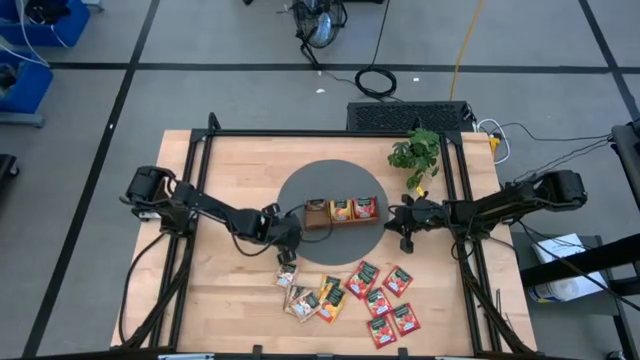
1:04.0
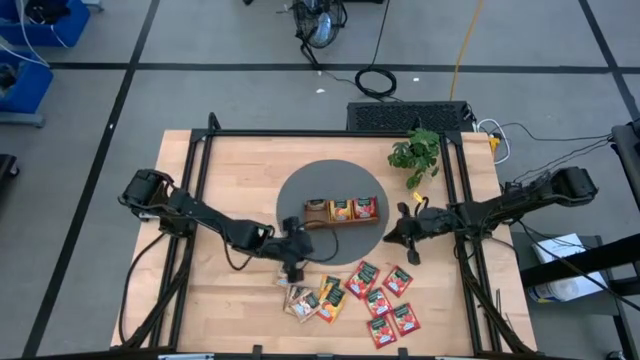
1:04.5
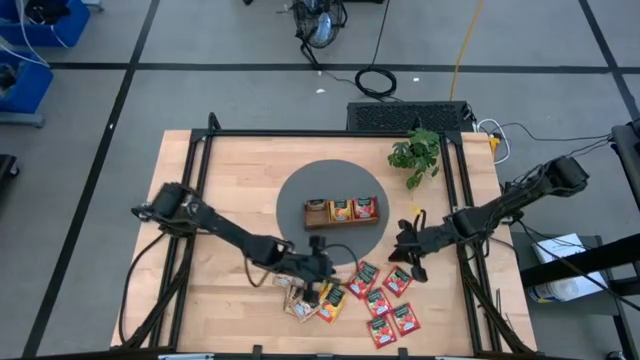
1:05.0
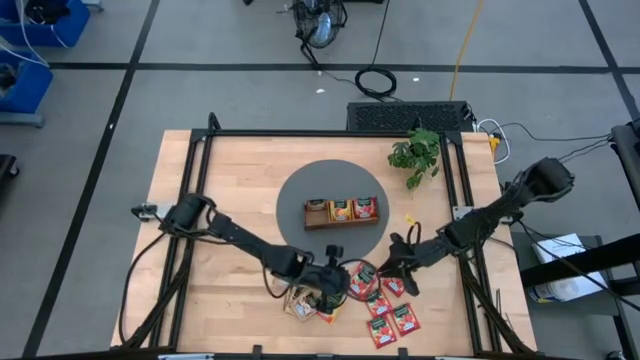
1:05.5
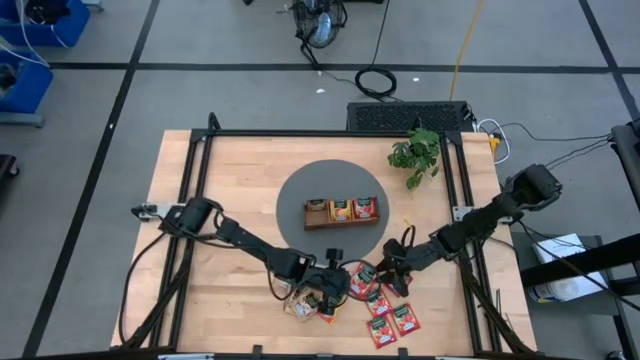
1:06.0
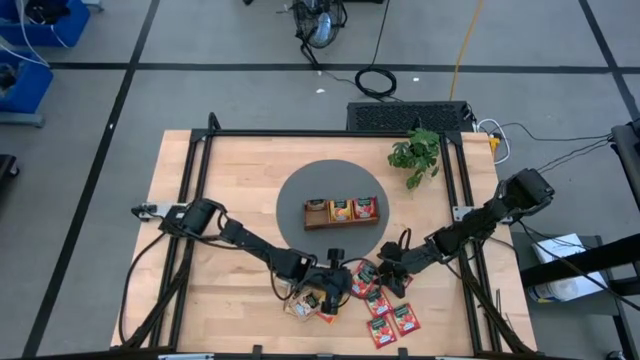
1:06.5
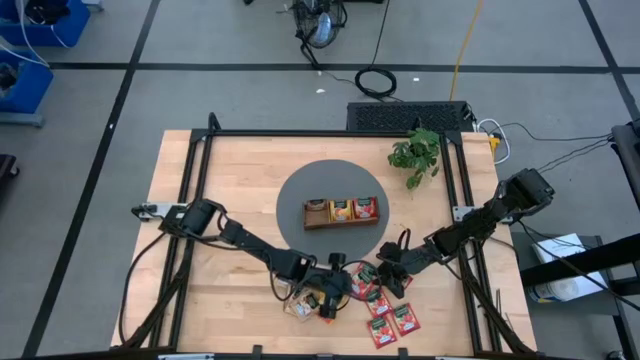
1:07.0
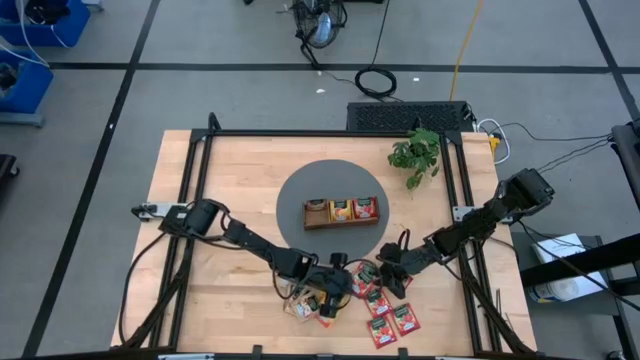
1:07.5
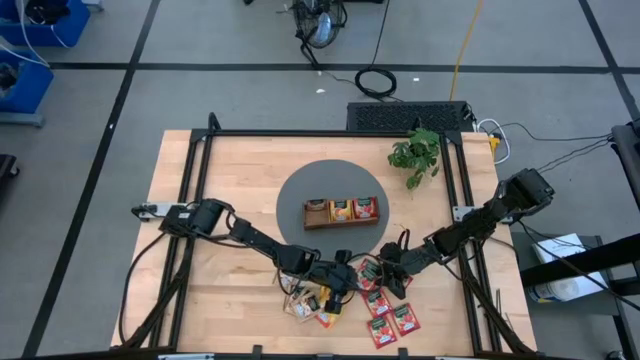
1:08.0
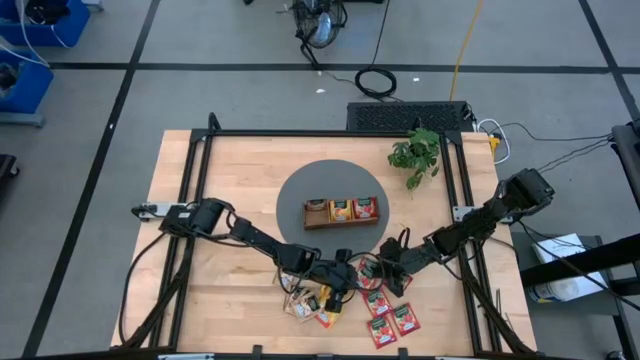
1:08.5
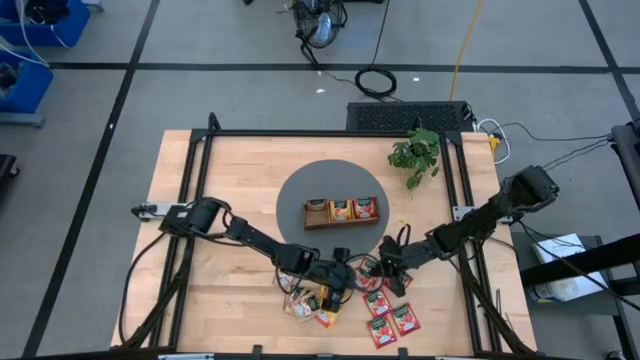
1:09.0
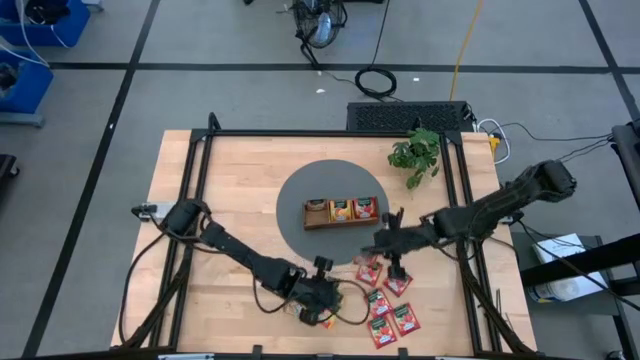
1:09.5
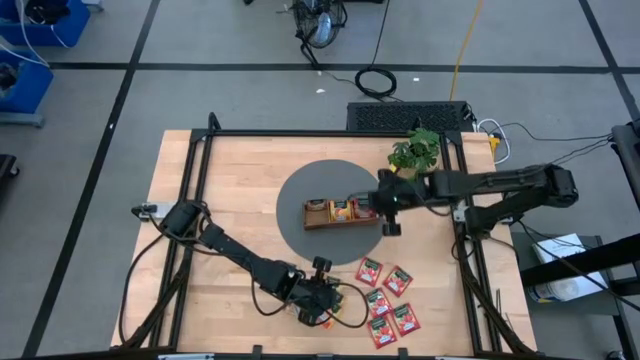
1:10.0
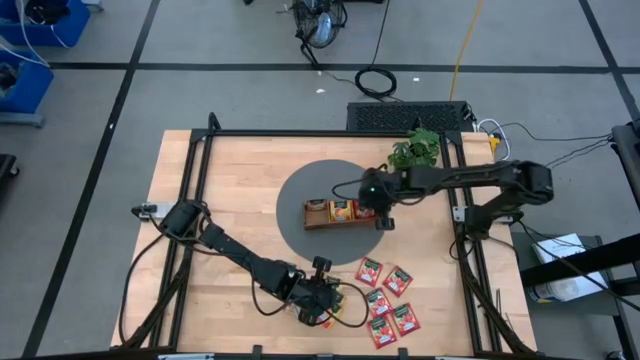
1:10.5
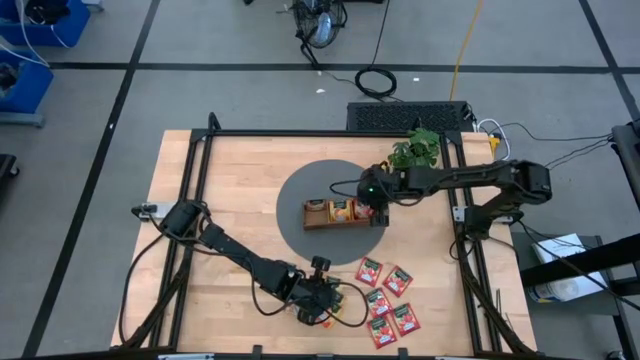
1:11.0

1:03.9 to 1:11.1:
Task: Pick & Place Tea
Put the red tea bag into the right compartment of the wooden organizer

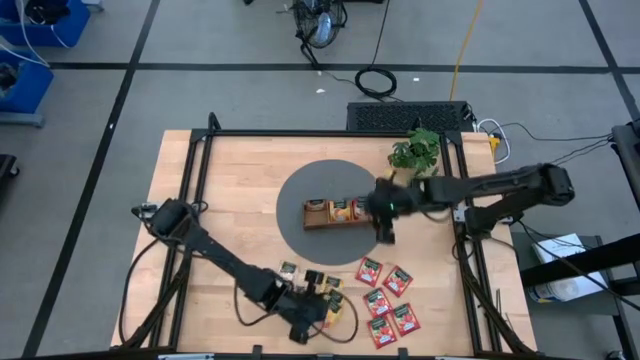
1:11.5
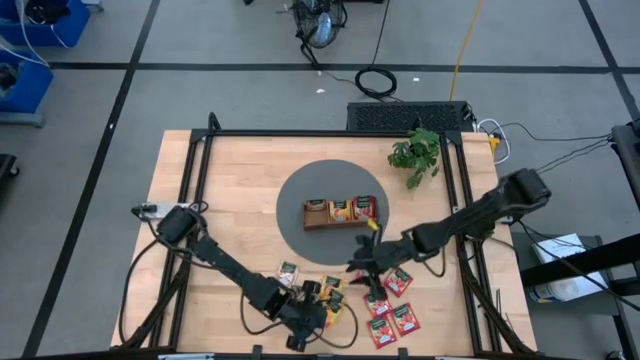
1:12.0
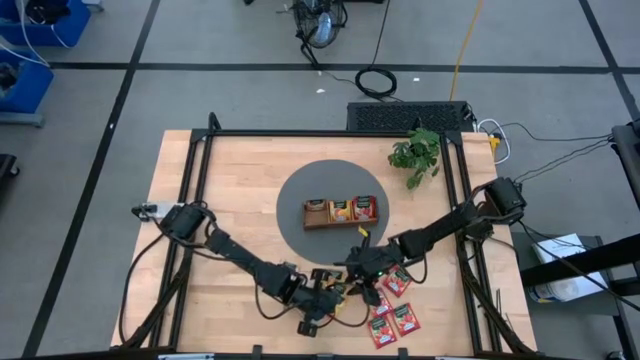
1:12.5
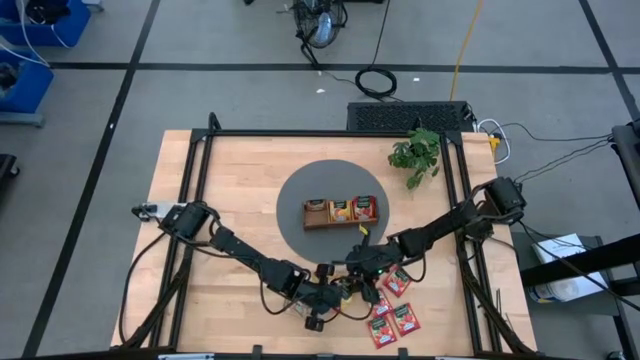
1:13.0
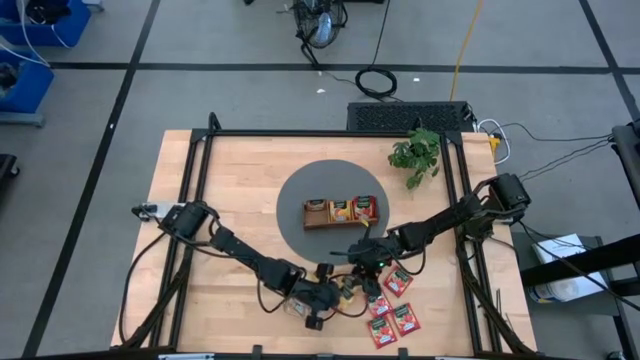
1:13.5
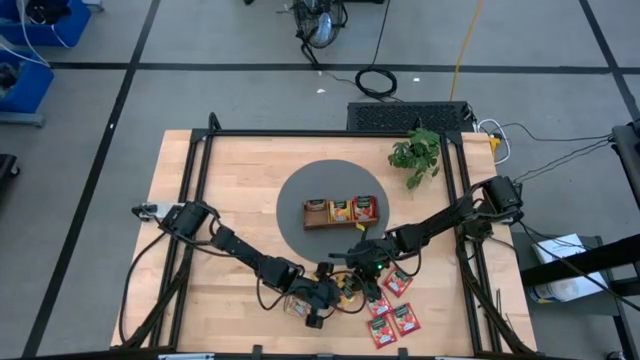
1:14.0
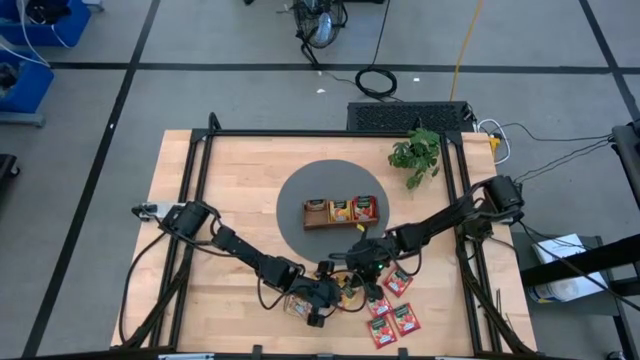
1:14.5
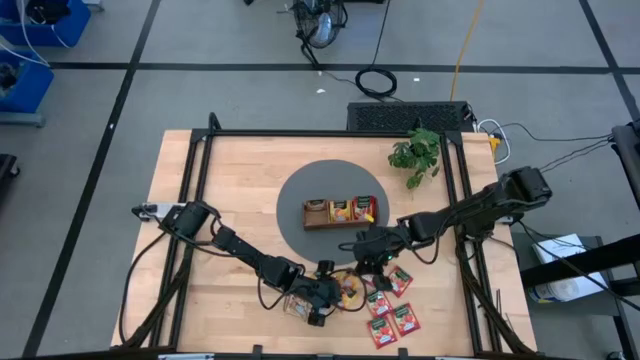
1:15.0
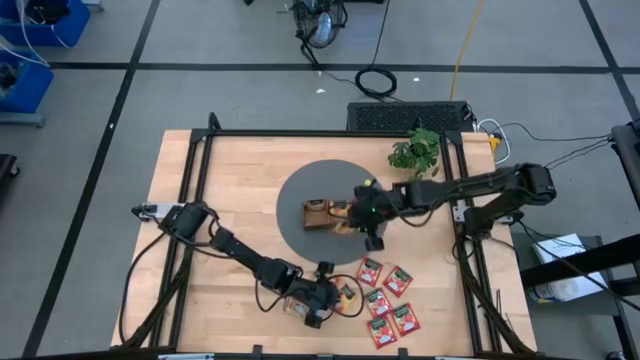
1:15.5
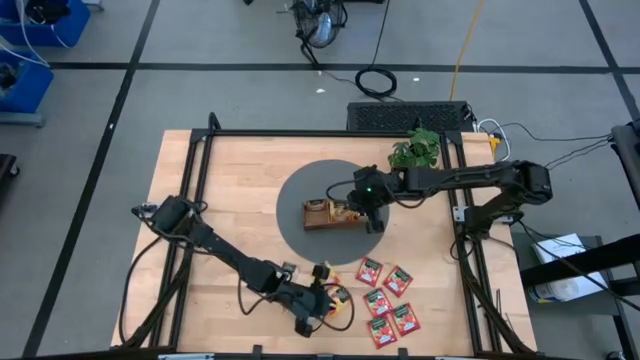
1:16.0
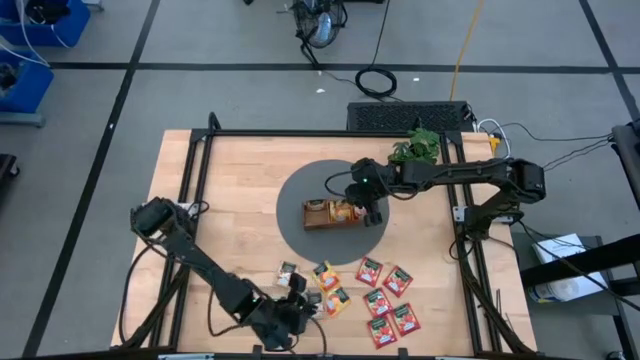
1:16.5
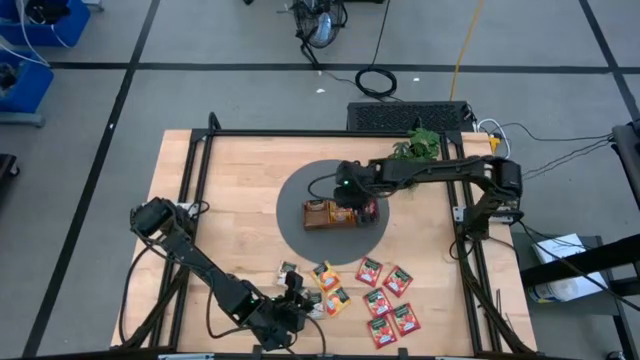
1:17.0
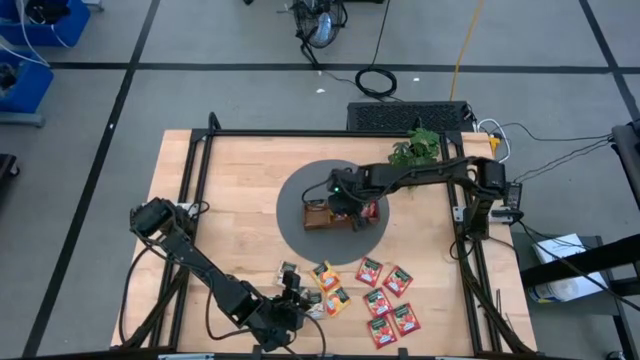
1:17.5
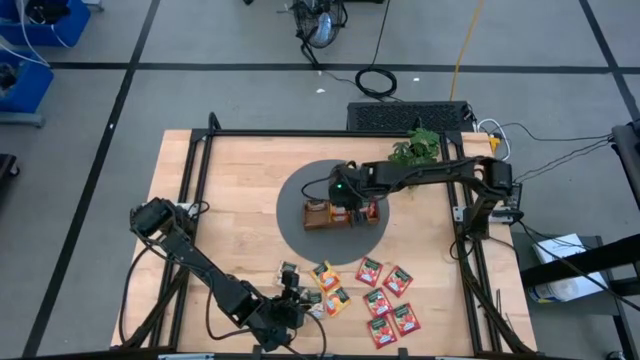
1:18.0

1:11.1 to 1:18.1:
Put the yellow tea bag into the middle compartment of the wooden organizer

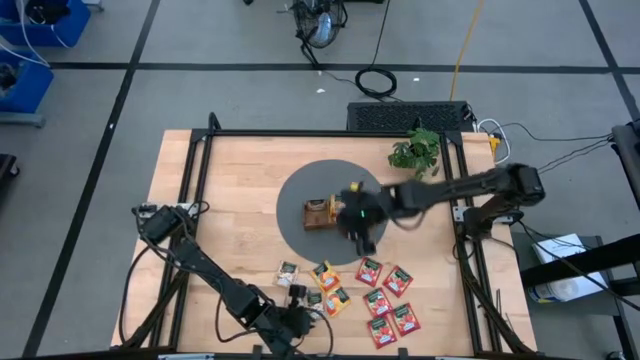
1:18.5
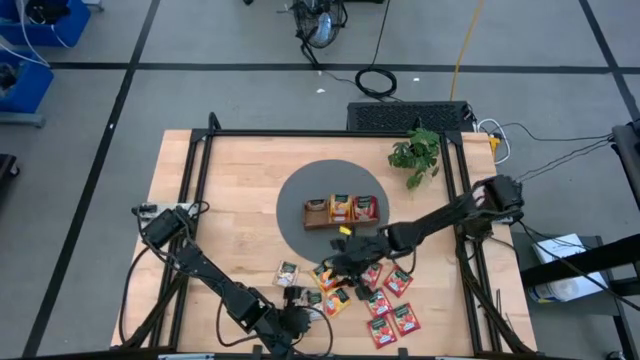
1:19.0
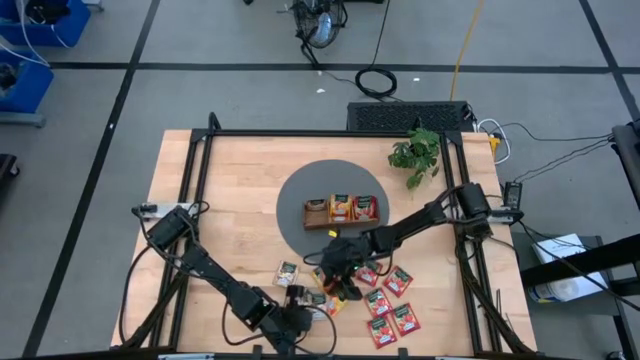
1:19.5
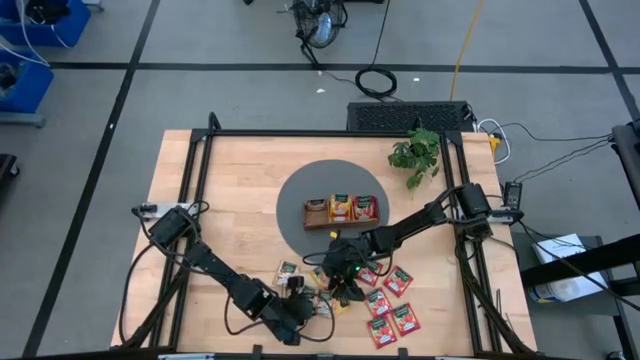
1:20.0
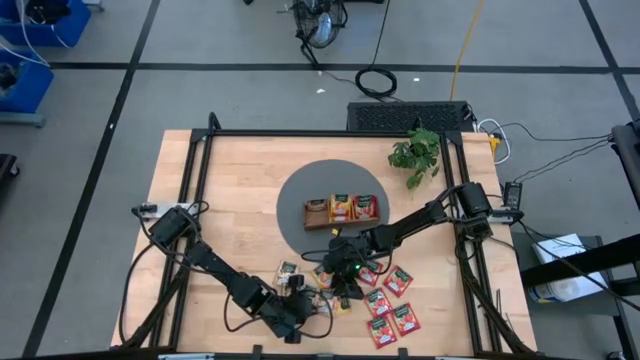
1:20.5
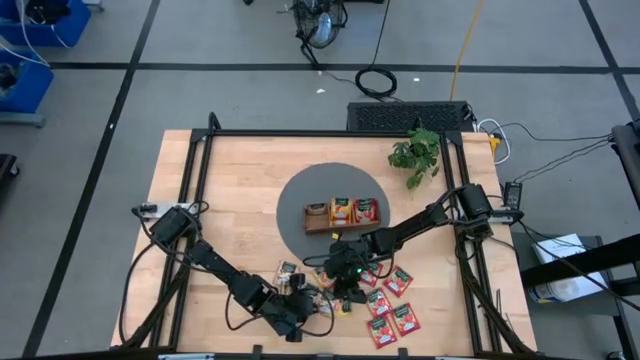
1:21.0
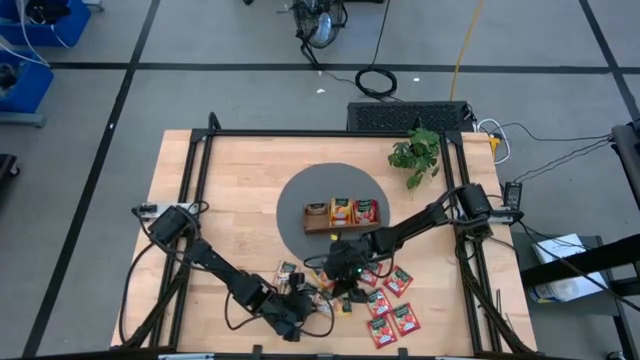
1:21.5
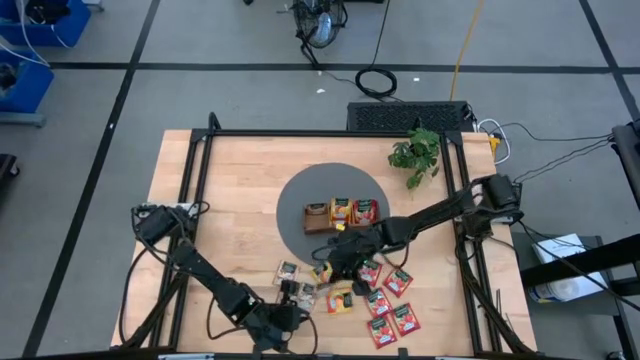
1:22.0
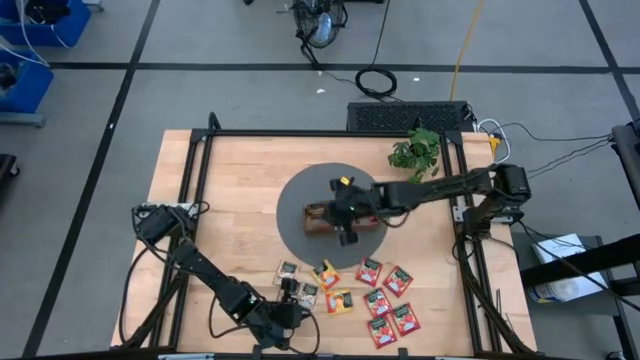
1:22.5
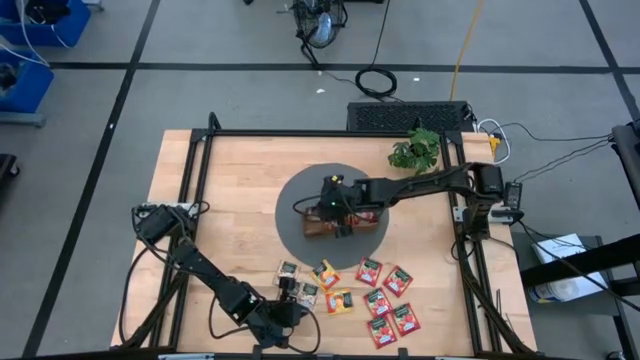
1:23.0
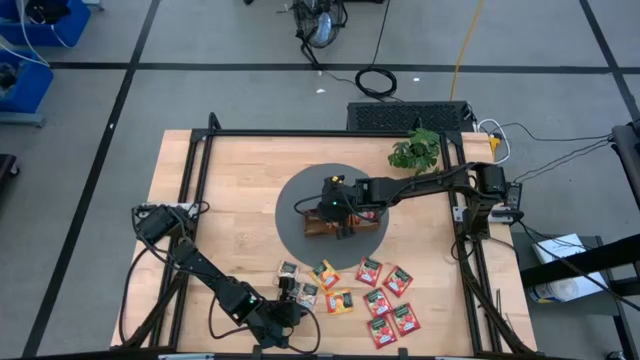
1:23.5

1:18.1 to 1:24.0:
Put the gold tea bag into the left compartment of the wooden organizer

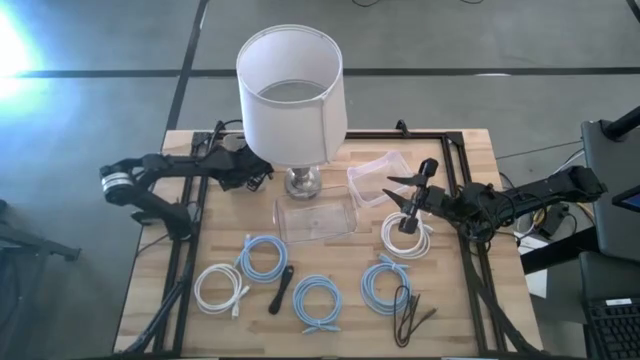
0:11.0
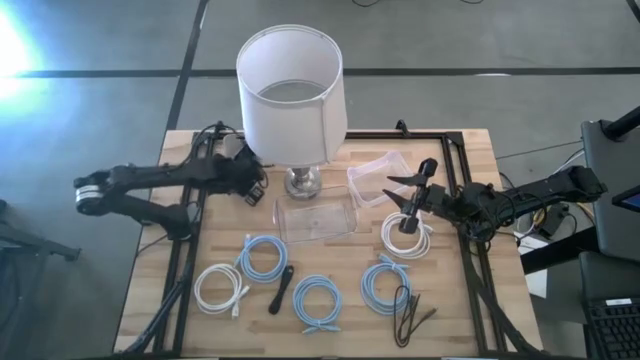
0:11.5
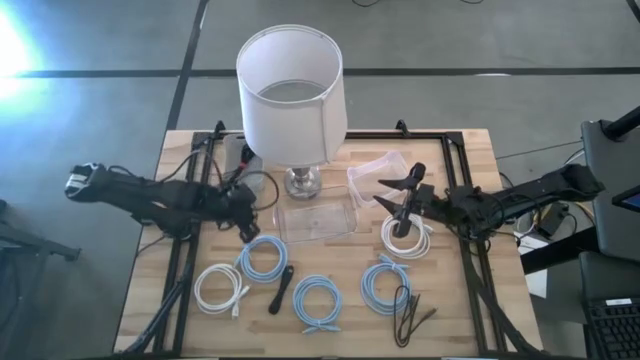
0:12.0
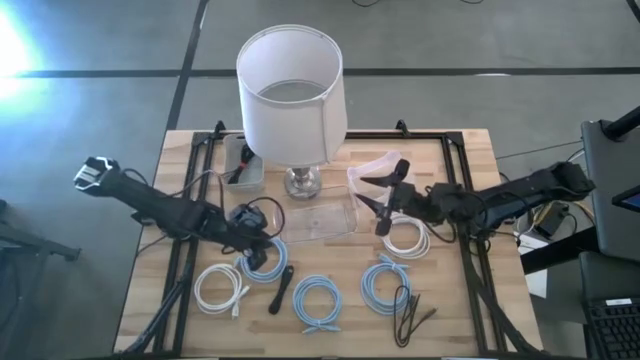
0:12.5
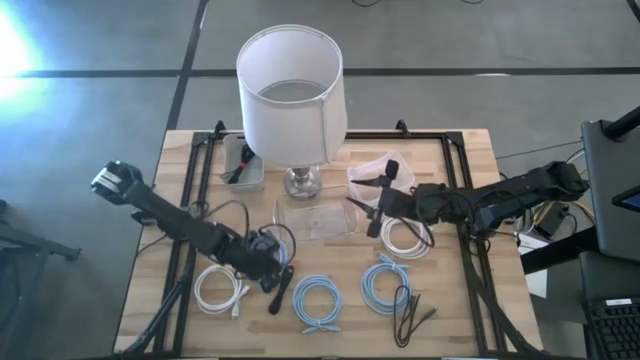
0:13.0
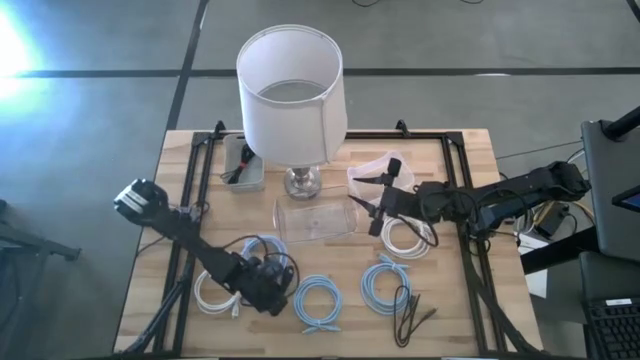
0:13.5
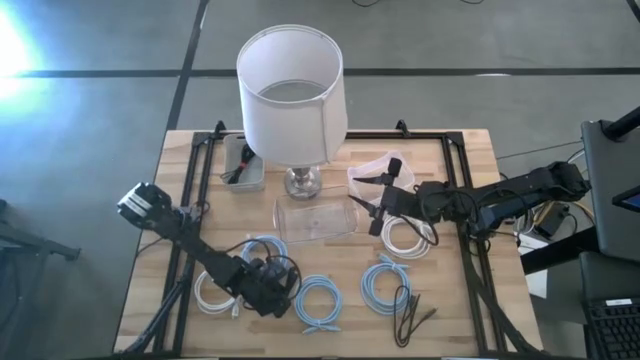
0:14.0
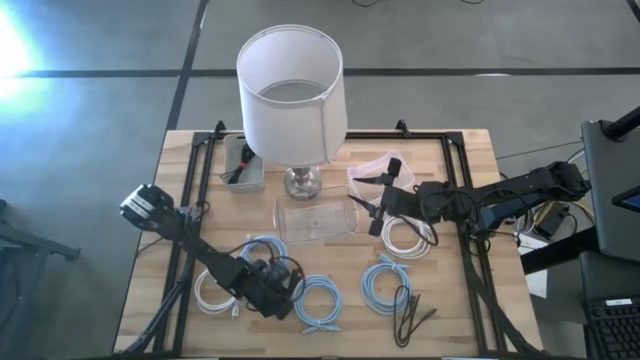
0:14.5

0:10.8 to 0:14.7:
Task: Pick & Place USB Port
Put the left black usb cable into the gray bin
